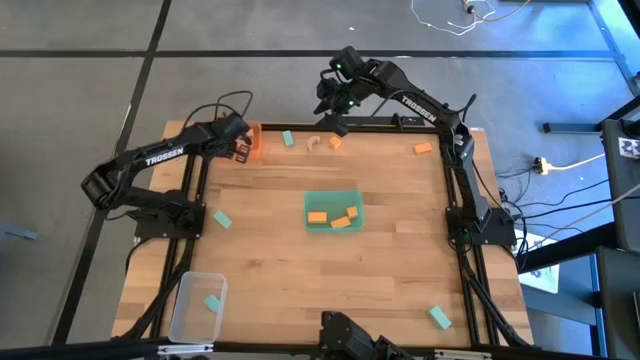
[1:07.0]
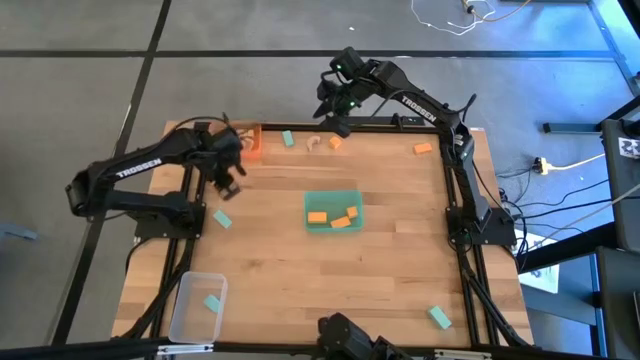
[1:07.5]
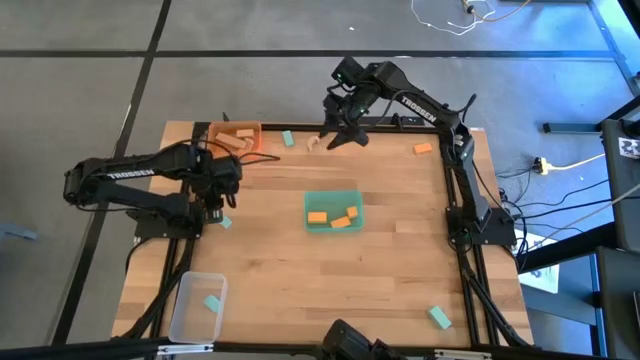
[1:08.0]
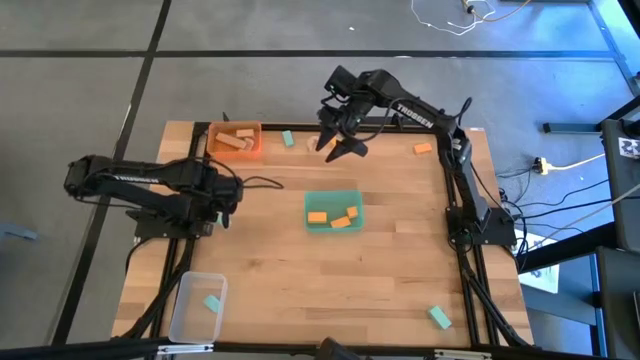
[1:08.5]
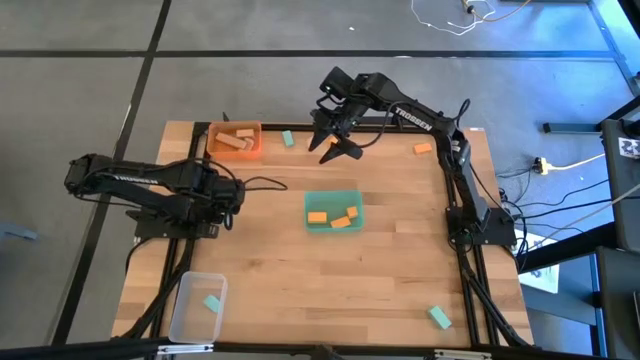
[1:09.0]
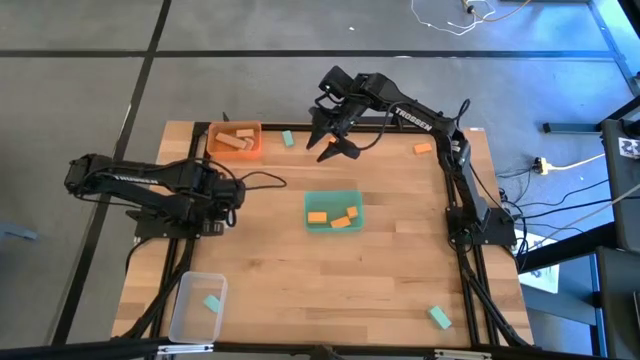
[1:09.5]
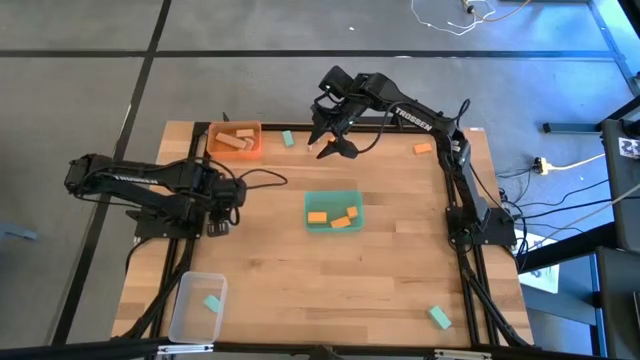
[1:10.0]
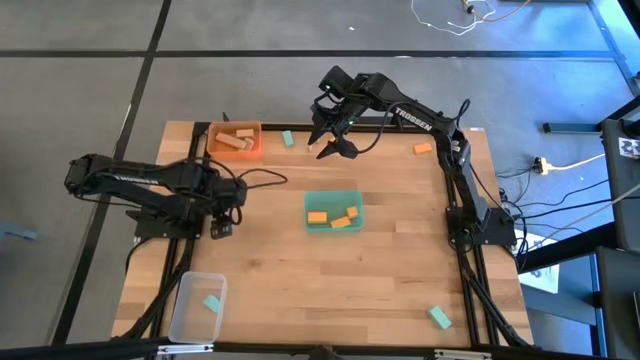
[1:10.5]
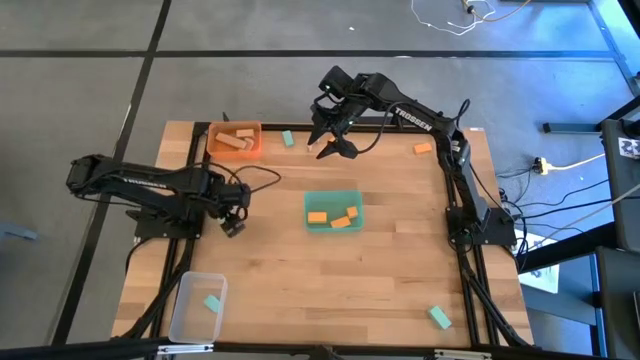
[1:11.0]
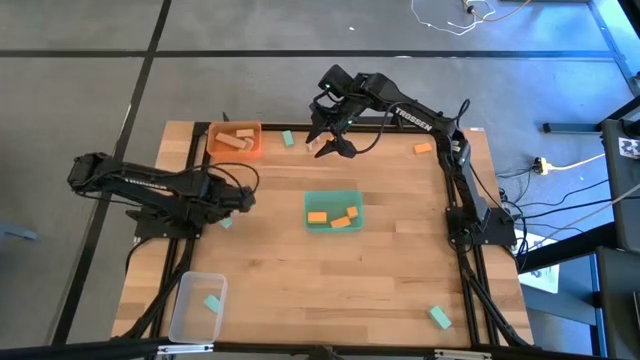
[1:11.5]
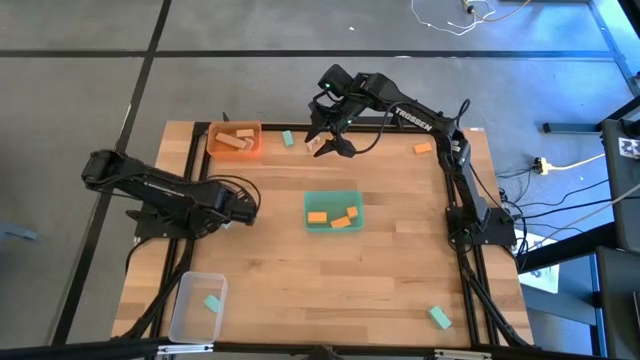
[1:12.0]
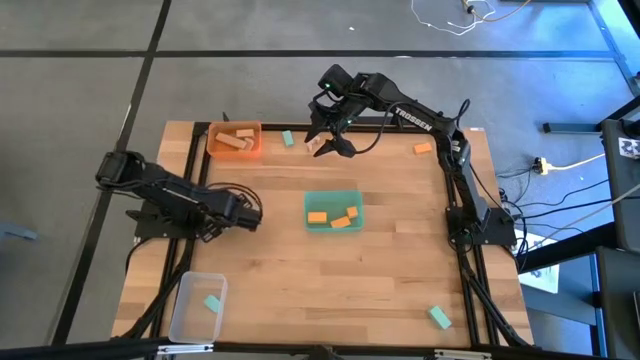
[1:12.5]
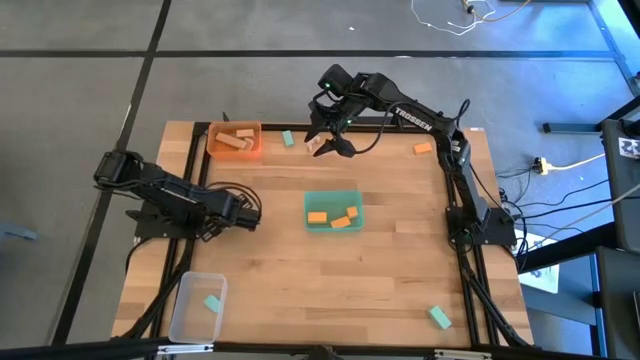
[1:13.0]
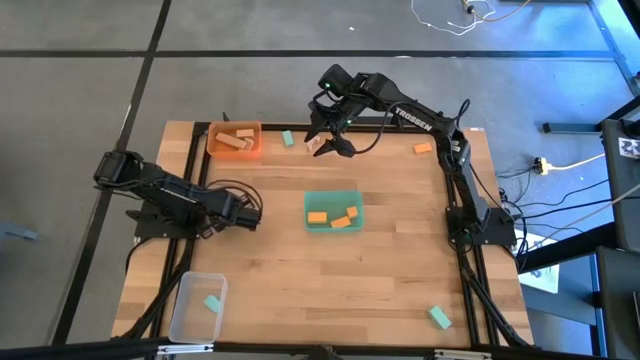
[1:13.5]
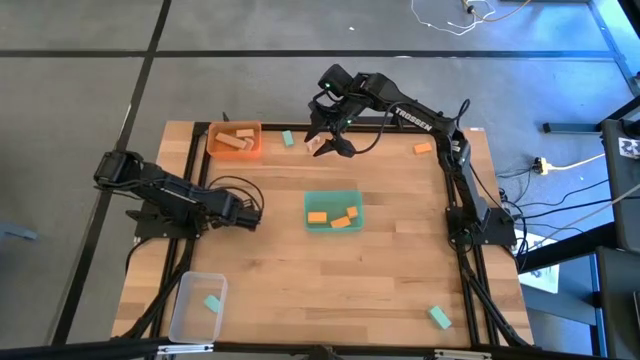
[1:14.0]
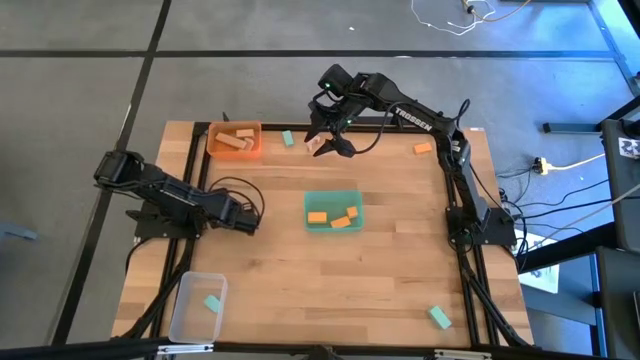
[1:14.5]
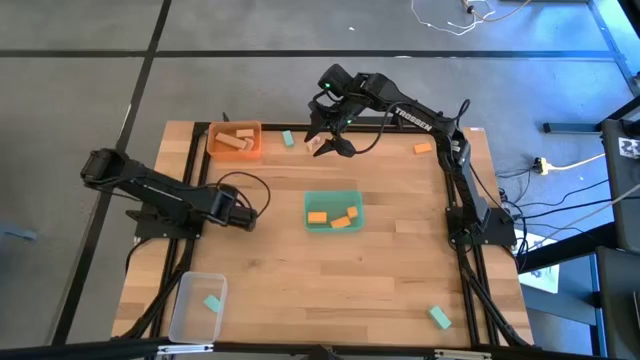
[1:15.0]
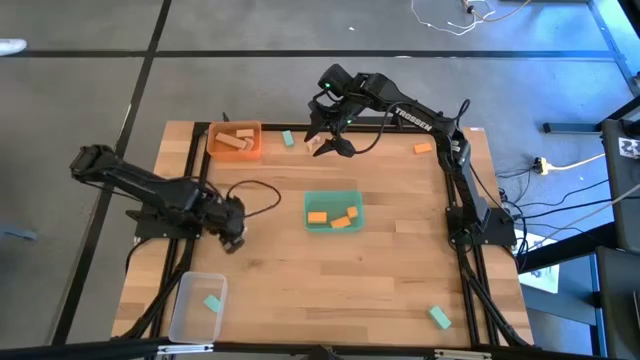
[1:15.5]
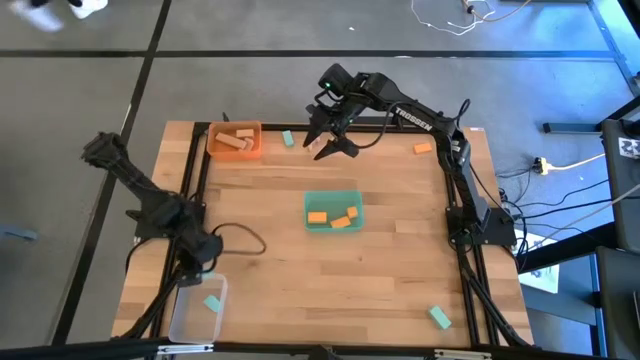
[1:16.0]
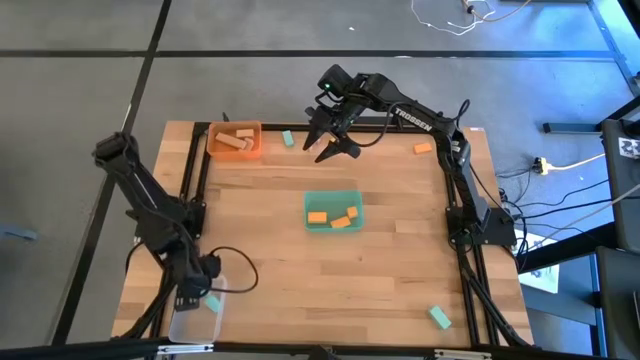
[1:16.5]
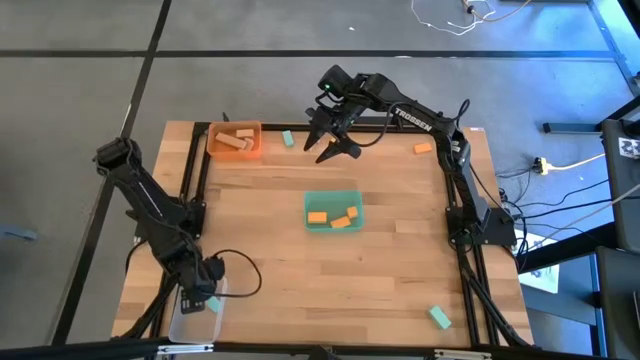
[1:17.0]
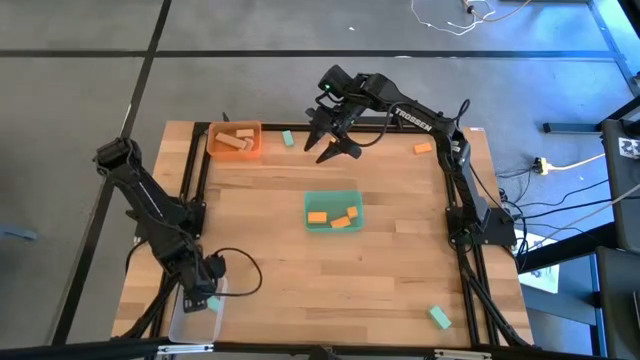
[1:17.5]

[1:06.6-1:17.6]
Task: Sort & place blocks by color
Put the blue block into the transparent bin

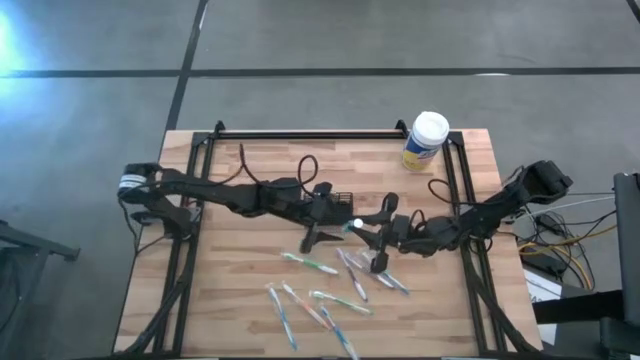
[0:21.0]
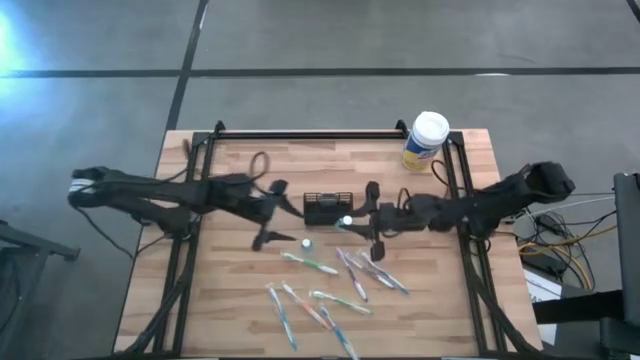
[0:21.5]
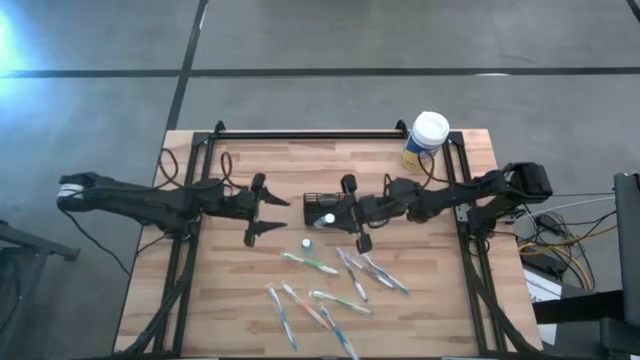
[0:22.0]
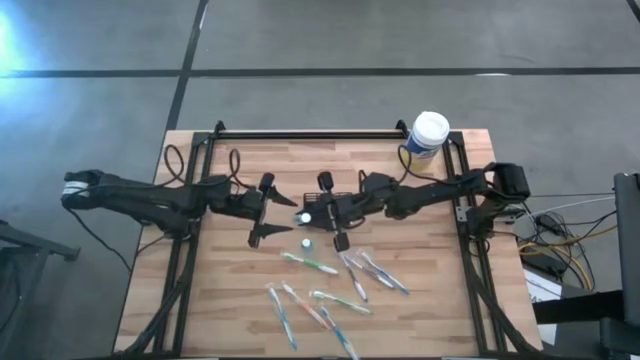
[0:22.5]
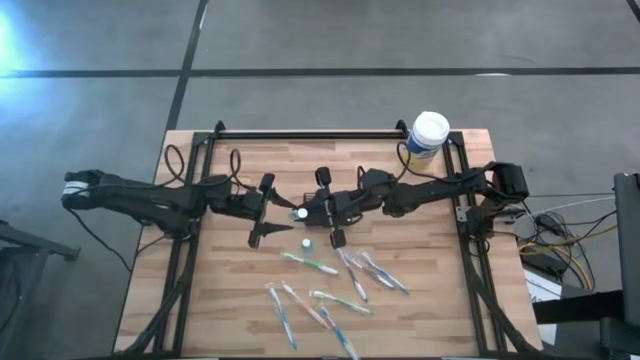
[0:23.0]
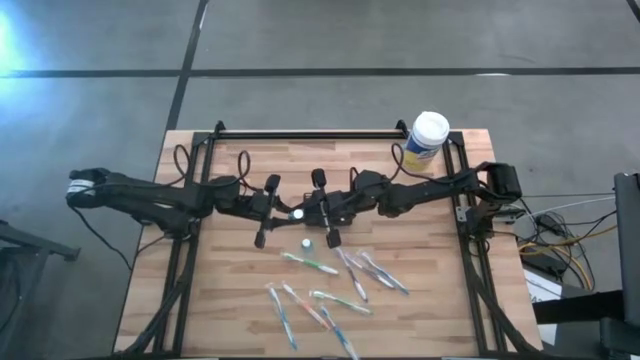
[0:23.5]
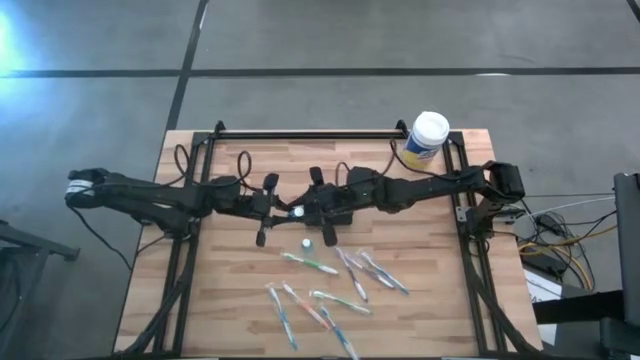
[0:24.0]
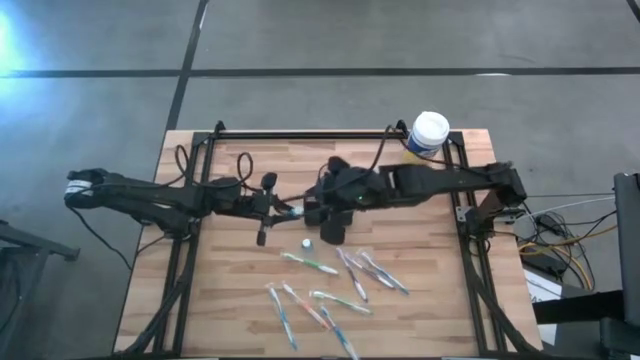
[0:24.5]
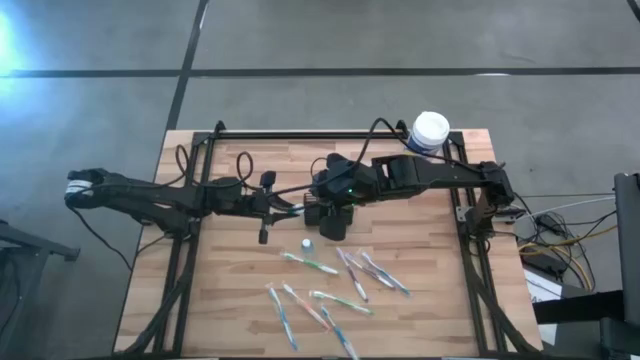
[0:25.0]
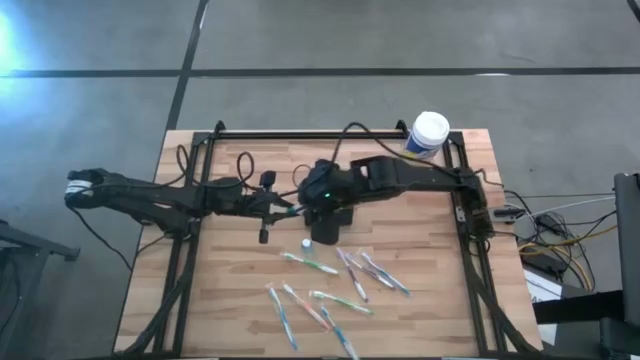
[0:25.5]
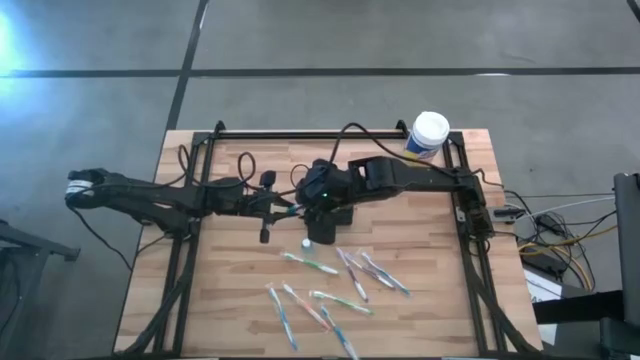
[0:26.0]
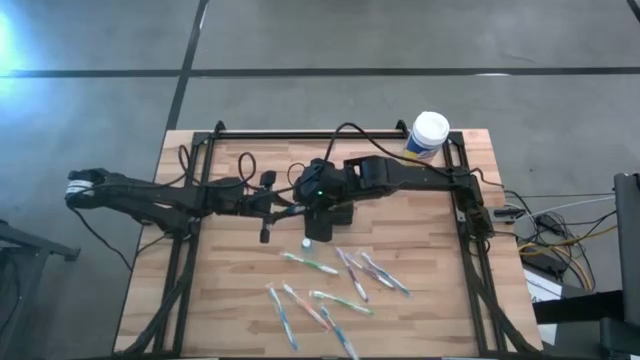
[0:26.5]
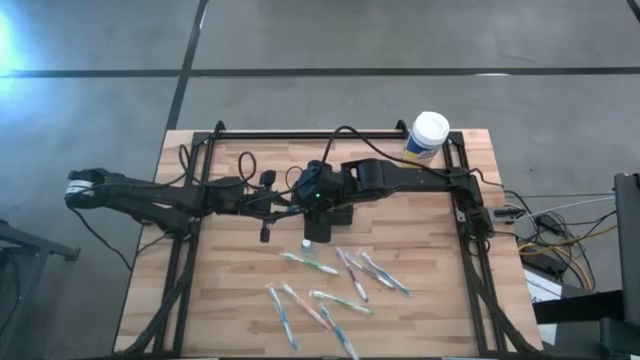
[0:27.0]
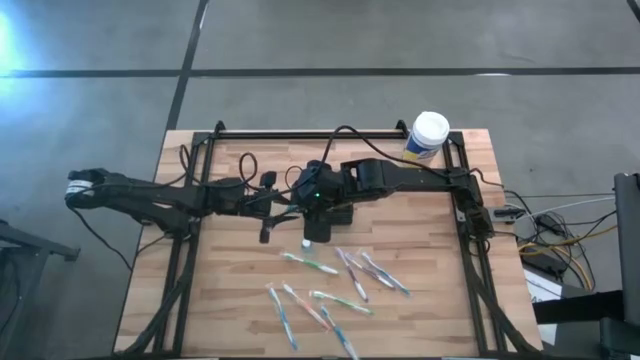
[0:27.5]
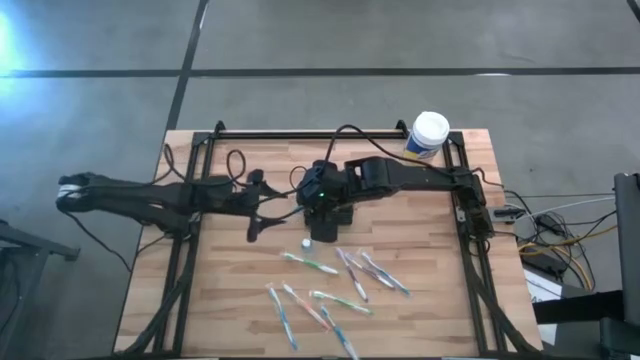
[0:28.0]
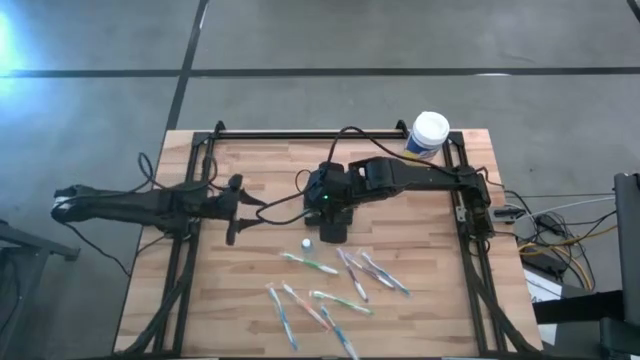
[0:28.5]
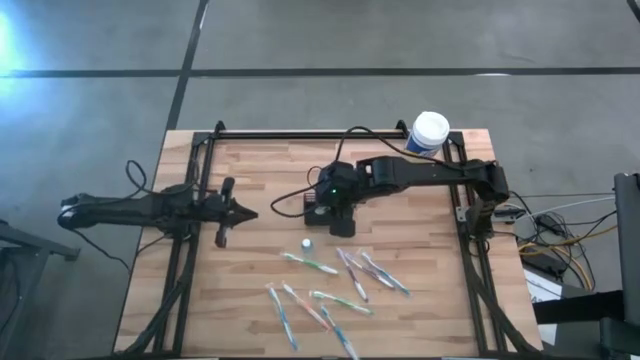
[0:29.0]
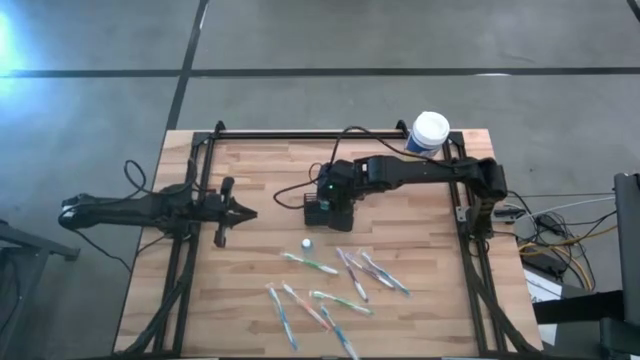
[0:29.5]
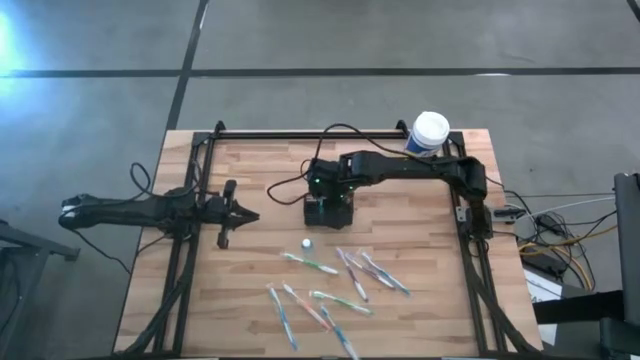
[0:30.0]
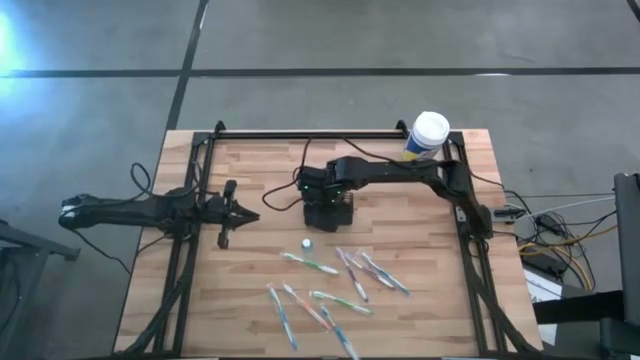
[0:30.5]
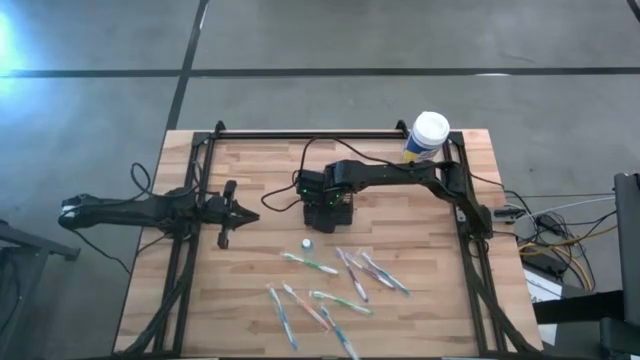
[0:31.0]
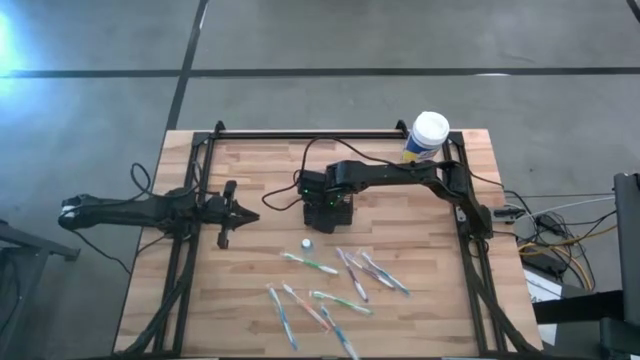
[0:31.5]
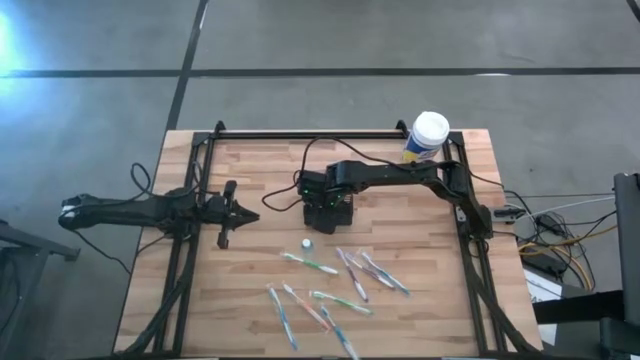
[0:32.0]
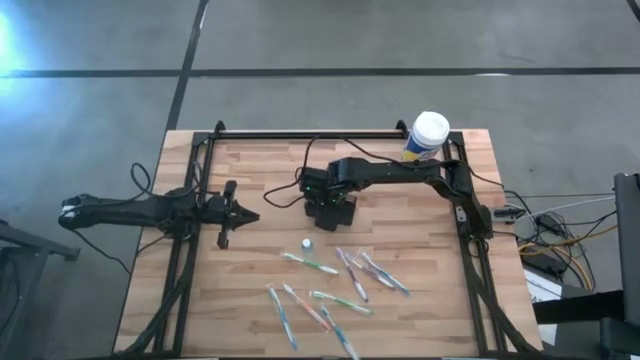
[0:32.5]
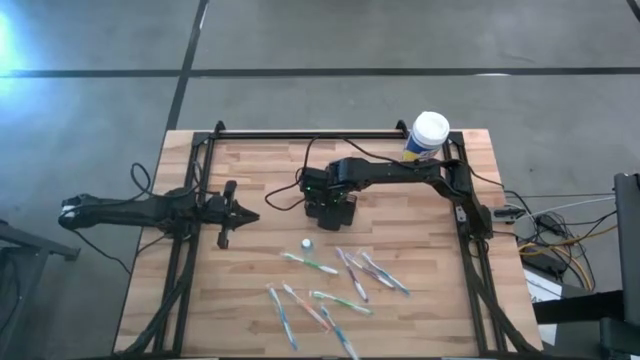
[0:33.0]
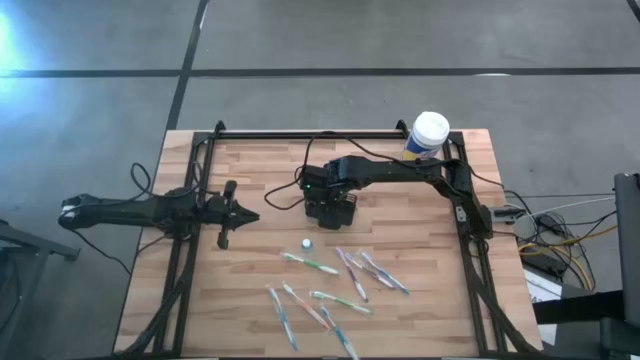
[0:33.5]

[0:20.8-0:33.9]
Task: Pick & Place toothbrushing station
Put the right blue mouthwash bottle into the black organizer
